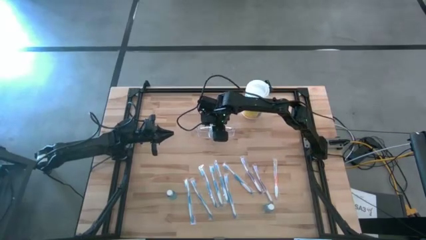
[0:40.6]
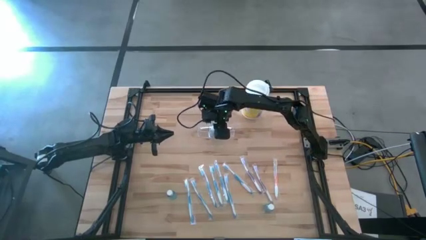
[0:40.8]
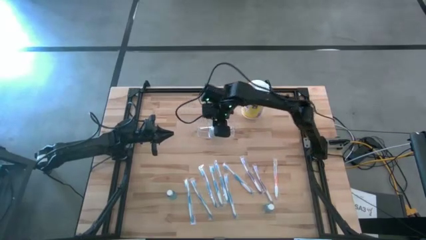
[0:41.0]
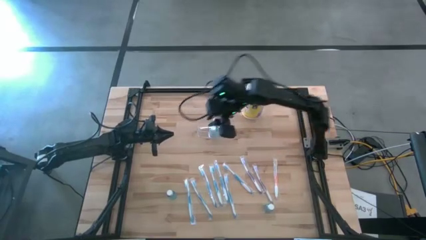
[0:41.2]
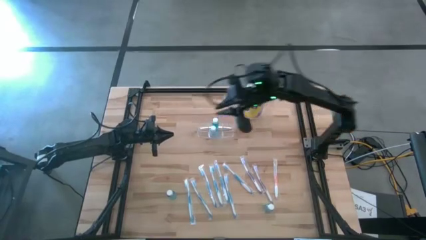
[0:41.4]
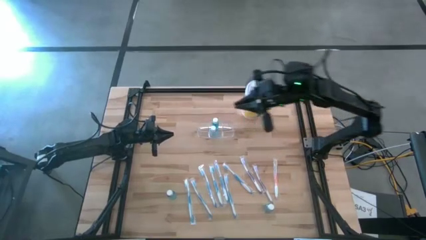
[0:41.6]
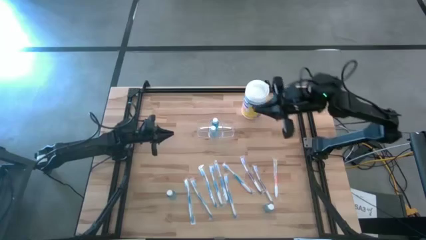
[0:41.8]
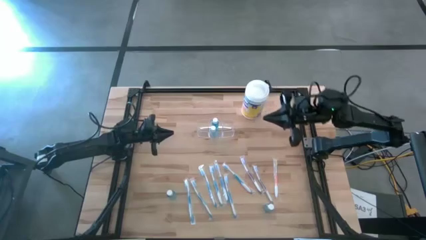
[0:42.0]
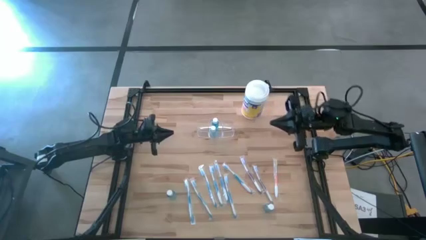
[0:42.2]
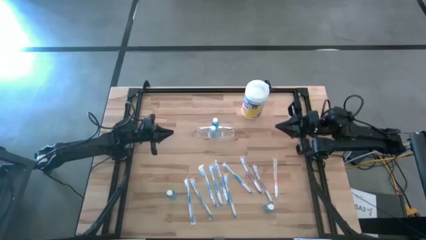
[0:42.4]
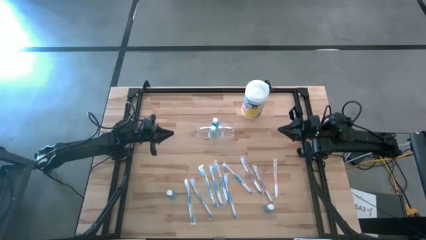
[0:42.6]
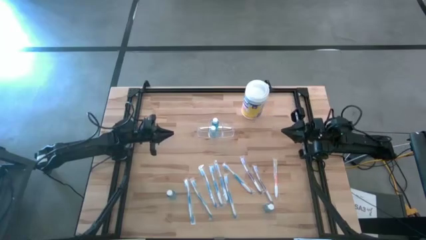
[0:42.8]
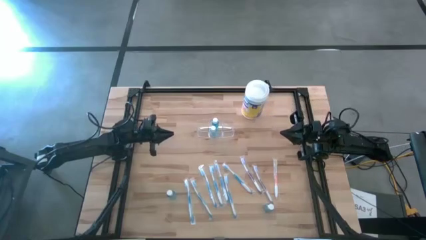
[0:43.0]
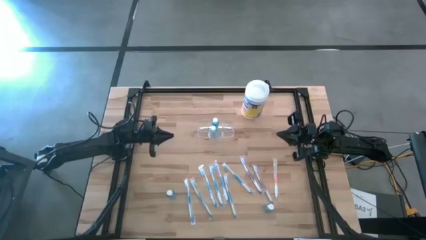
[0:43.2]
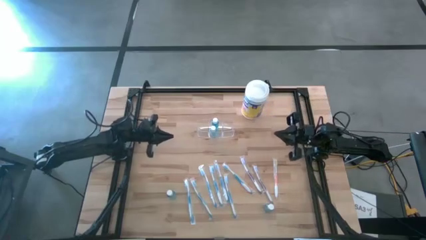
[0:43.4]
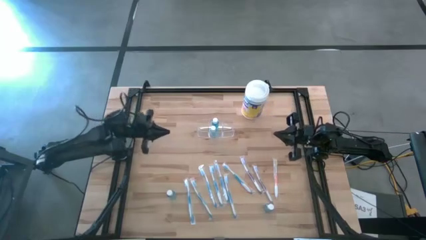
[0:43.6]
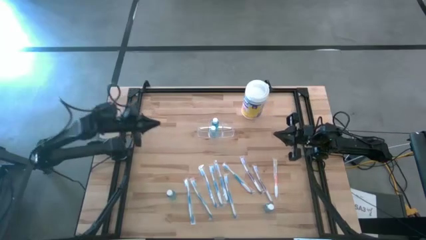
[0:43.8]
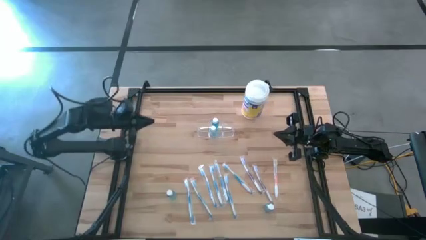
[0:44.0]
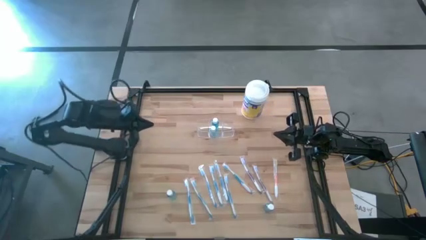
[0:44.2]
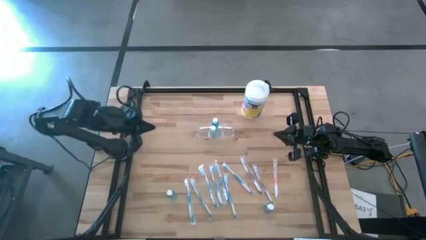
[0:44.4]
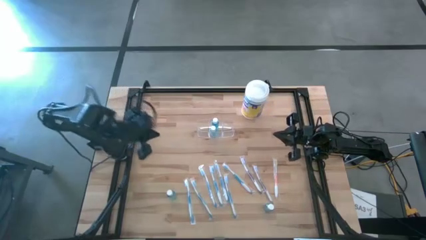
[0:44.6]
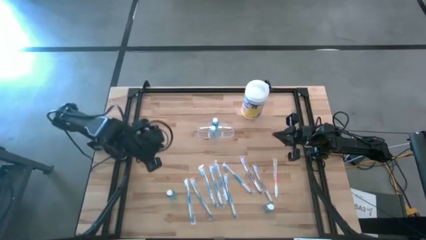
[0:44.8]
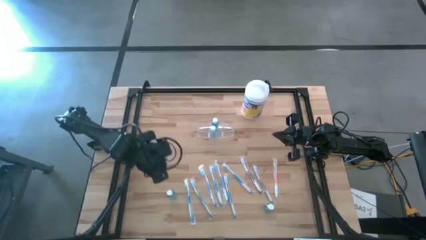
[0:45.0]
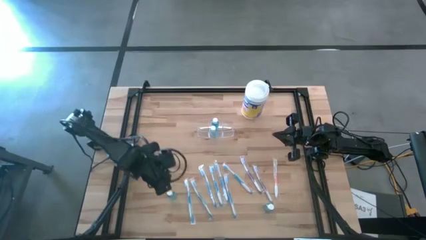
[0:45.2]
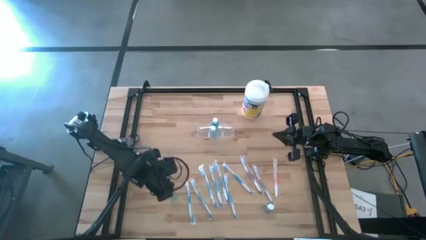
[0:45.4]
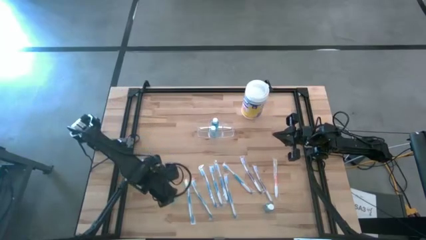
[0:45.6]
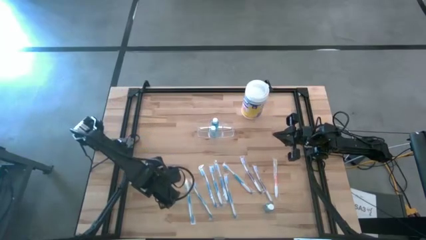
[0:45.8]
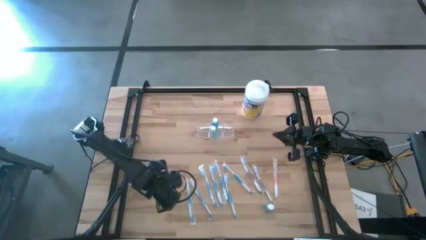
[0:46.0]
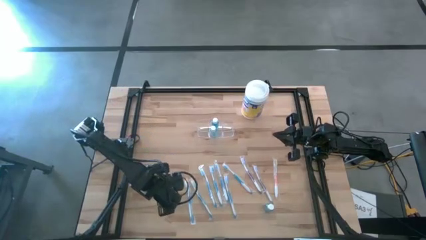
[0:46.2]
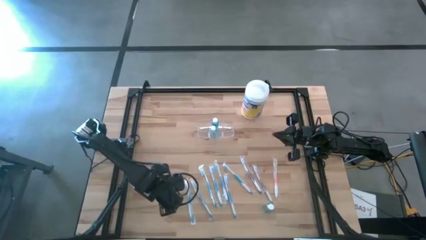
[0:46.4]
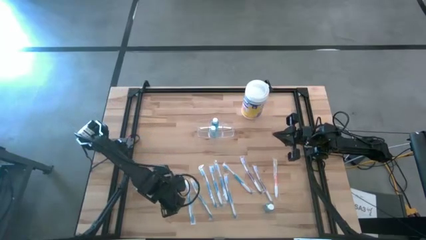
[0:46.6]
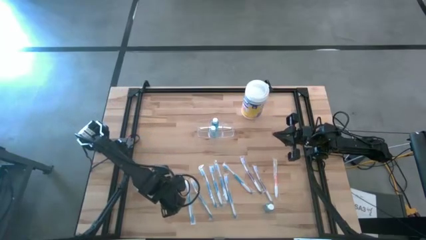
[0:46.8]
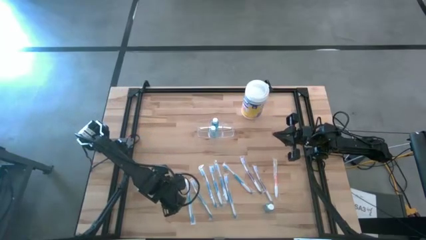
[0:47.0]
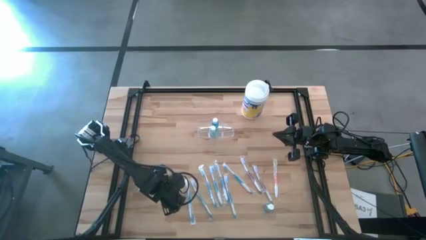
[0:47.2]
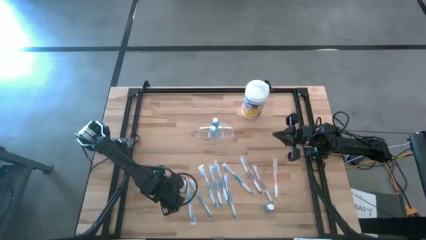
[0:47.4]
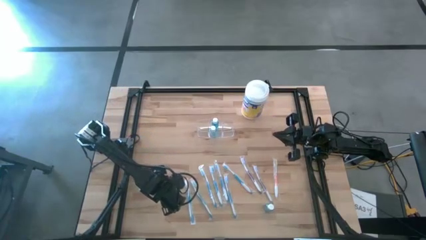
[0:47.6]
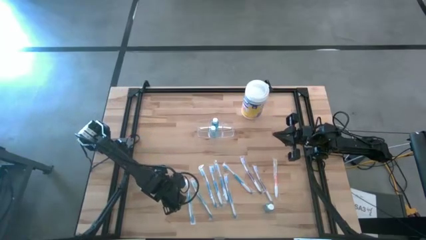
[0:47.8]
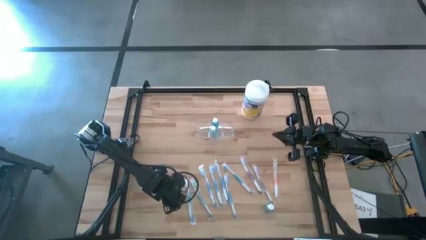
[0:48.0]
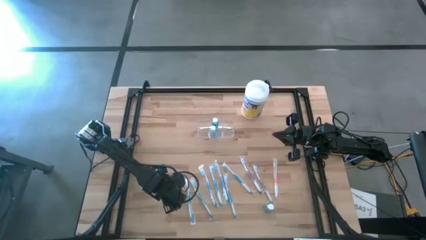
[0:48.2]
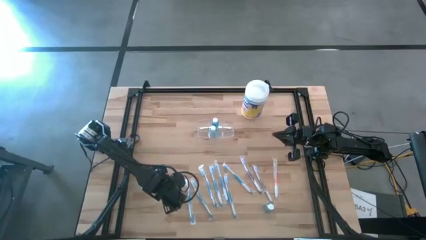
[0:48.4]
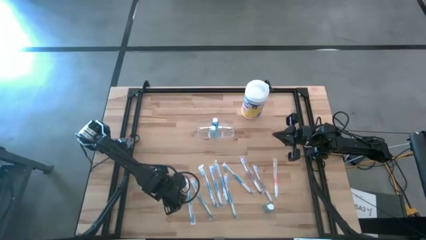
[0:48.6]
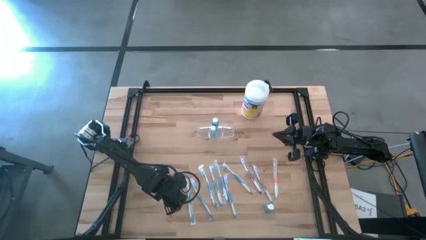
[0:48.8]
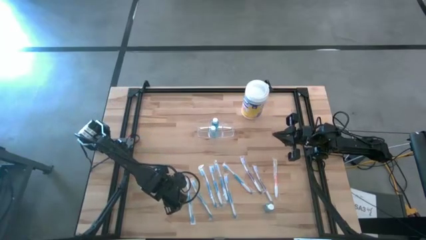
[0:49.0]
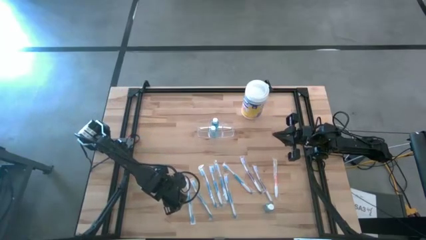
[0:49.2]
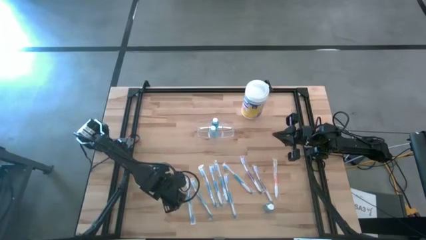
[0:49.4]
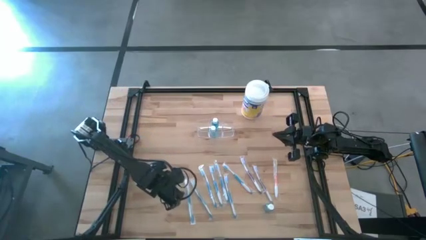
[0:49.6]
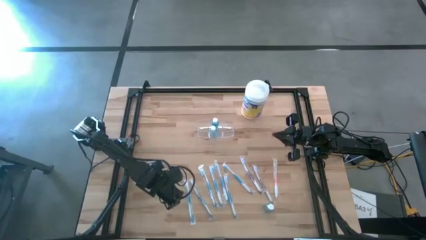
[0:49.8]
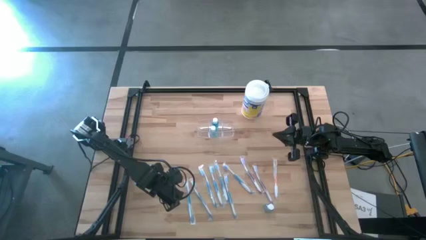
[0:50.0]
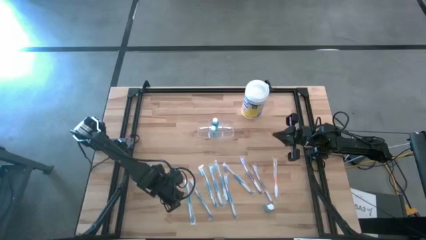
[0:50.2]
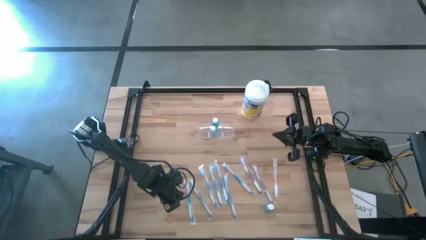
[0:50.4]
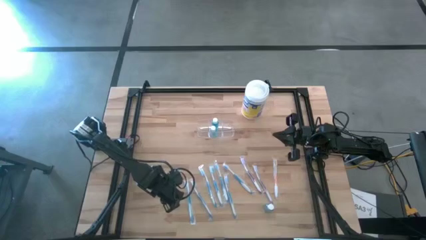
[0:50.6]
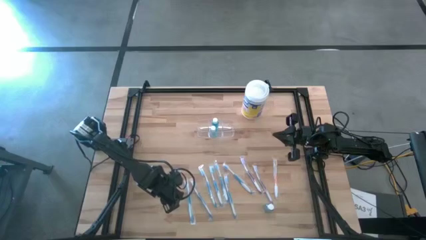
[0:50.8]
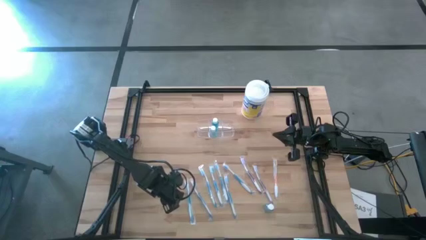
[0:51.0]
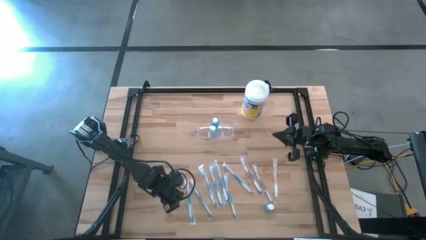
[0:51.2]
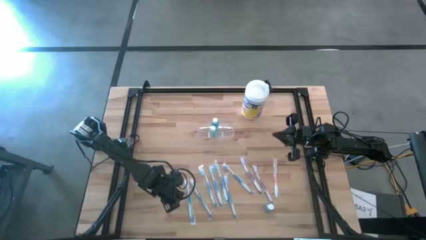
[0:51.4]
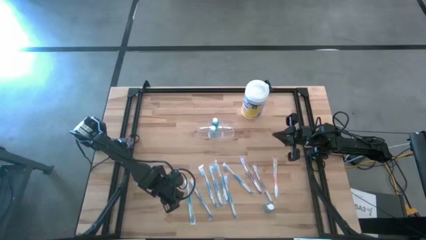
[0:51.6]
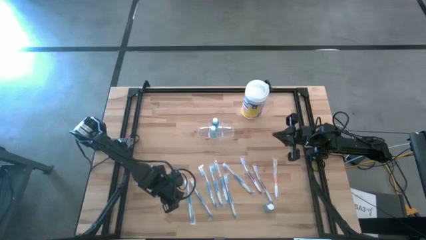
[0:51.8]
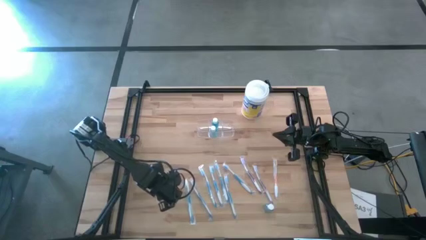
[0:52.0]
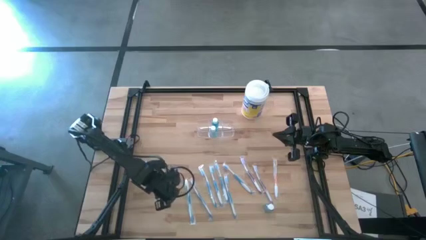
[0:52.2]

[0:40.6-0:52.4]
Task: Pick & Place toothbrushing station
Put the blue mouthwash bottle into the transparent organizer
